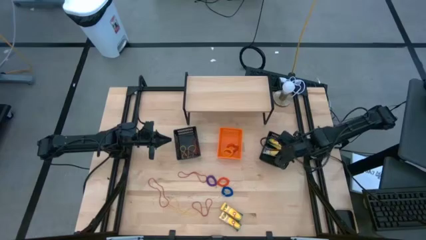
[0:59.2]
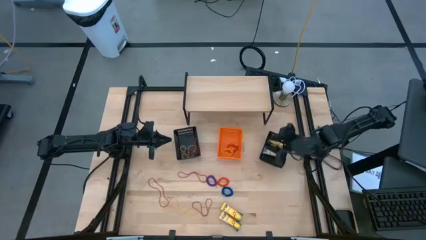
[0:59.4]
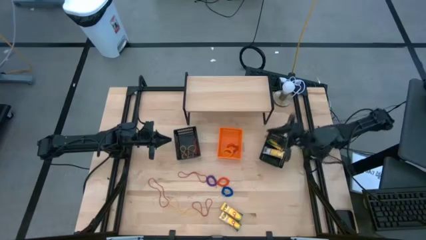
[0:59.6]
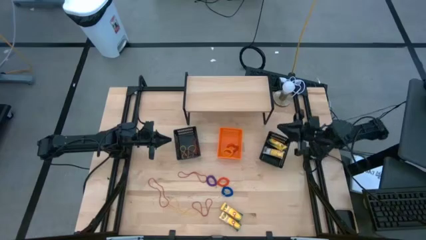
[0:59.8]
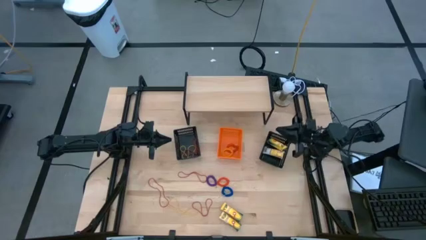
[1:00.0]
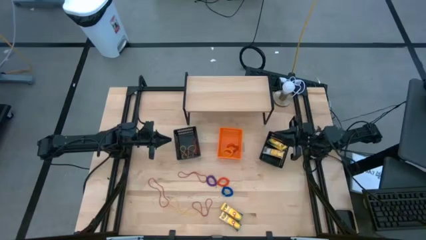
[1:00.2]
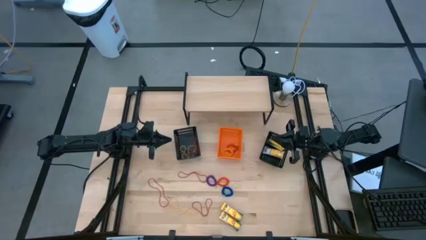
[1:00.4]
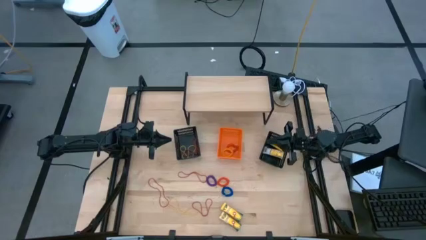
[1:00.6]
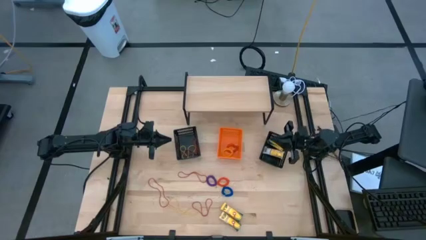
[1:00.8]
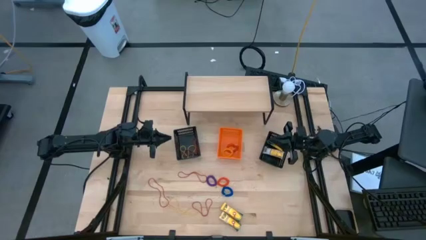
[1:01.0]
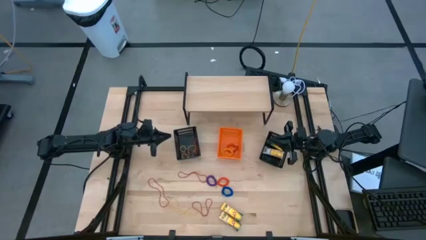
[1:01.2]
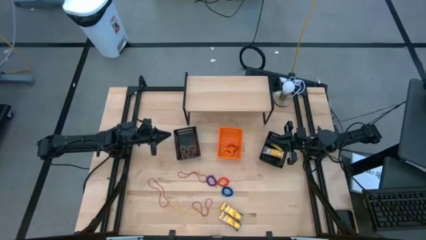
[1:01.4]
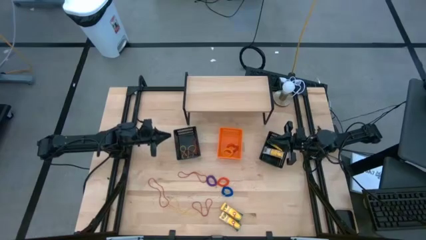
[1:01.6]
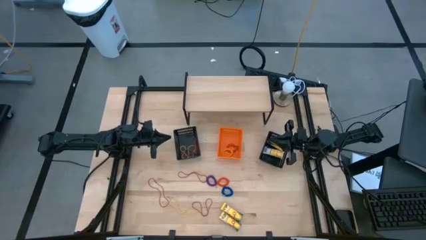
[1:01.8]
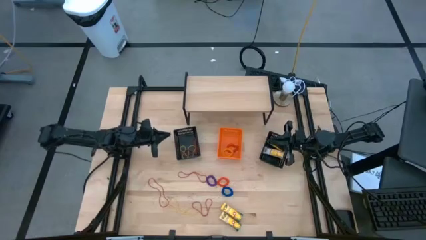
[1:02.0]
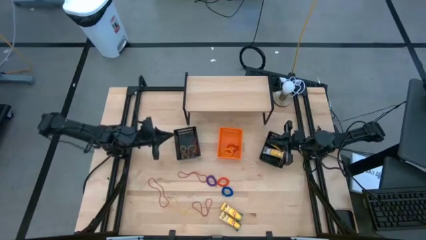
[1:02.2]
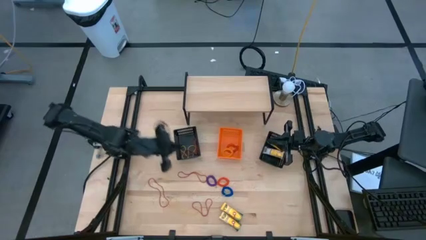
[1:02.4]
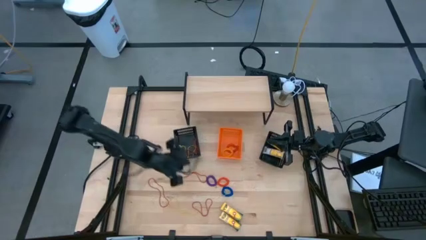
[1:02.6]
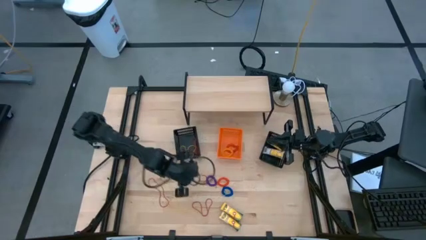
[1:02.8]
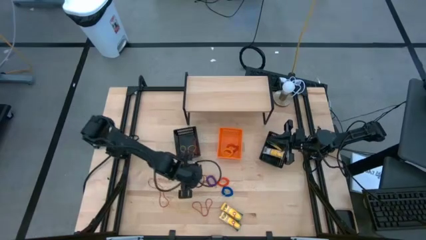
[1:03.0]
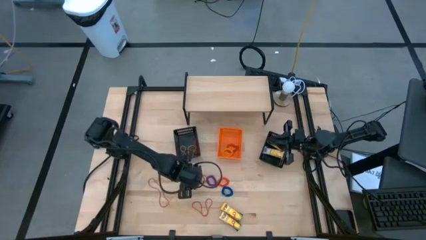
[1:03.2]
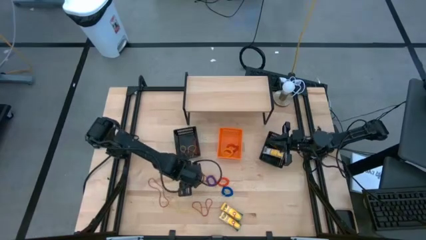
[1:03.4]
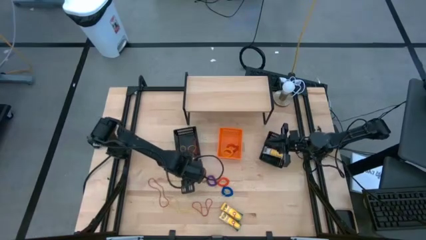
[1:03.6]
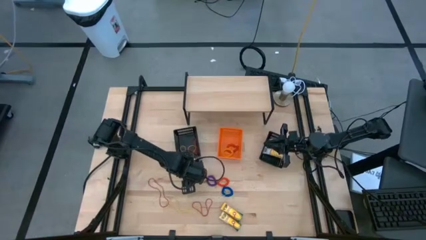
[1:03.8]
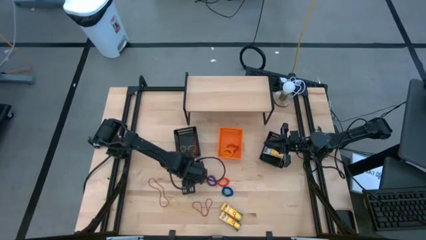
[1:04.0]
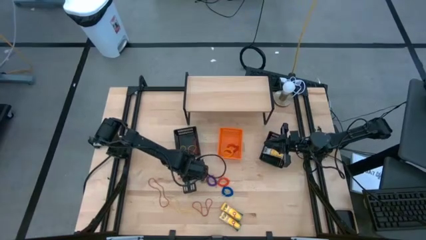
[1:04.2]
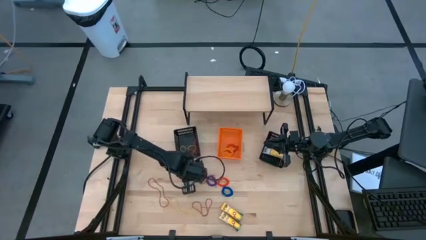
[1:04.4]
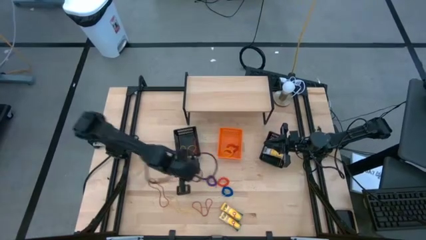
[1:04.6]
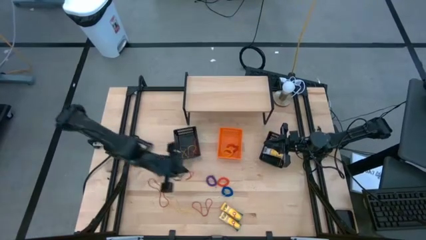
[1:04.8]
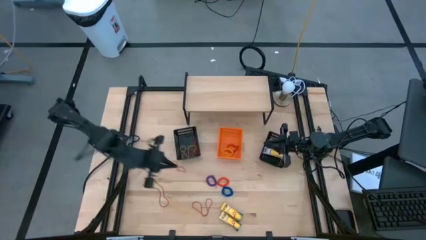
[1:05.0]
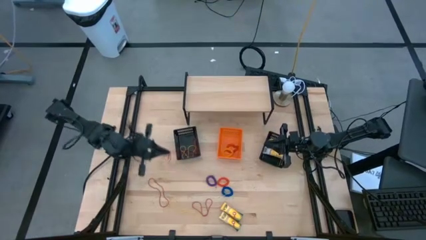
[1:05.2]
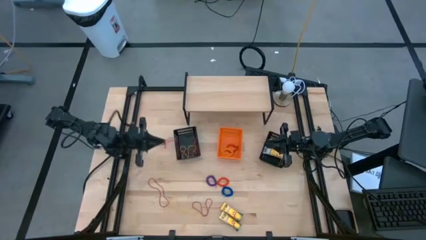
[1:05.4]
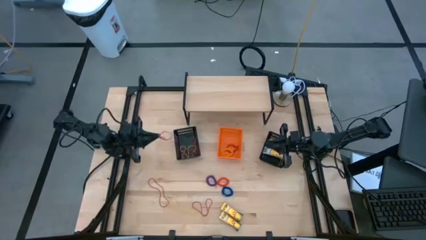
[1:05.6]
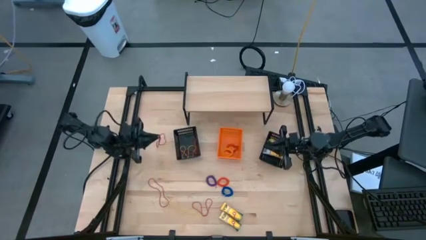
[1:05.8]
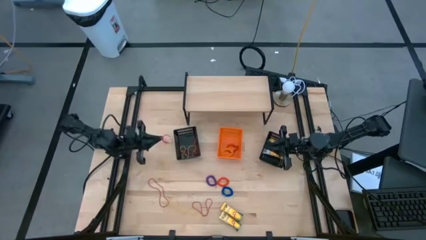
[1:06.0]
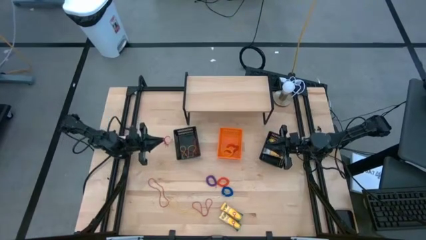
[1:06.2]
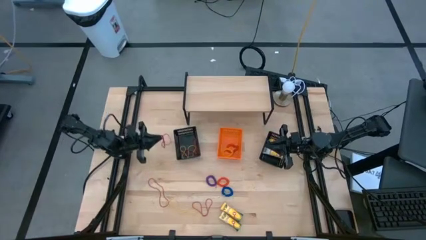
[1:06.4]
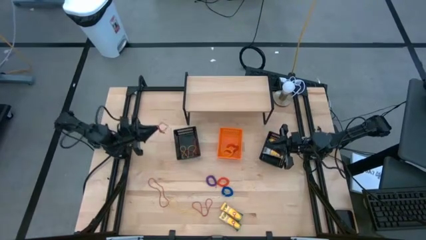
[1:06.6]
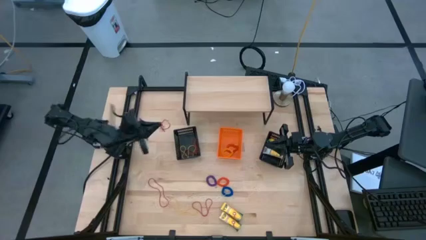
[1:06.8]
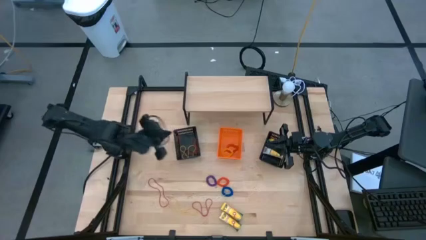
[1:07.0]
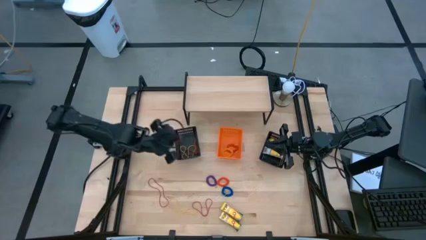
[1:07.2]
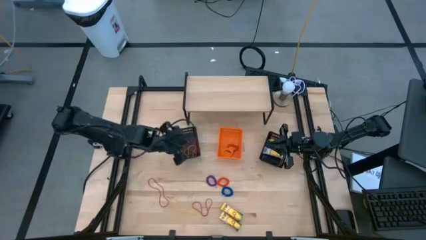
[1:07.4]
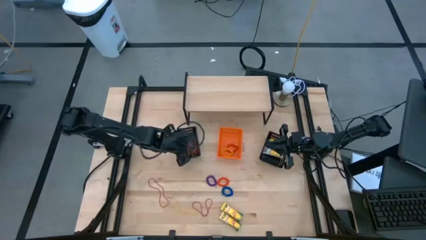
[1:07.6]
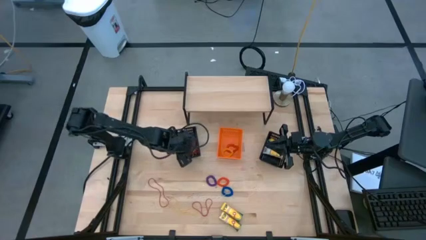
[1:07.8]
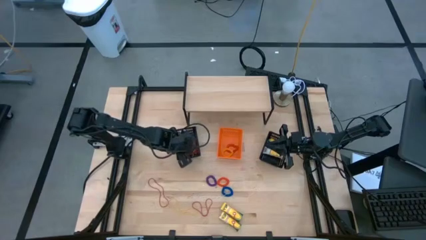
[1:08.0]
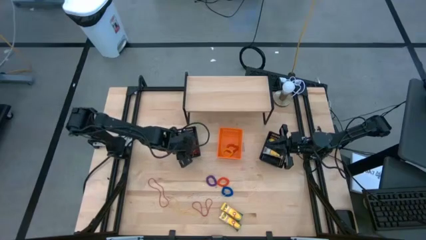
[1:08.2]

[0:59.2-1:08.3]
Task: Pick & Place Office Desk Supplies
Put the red rubber band into the left black bin

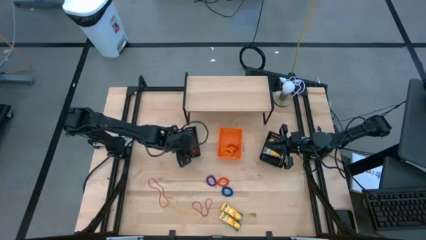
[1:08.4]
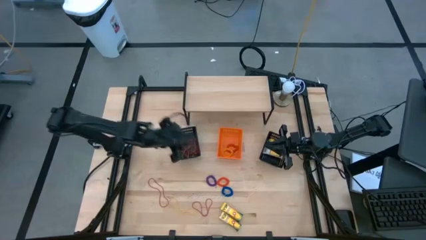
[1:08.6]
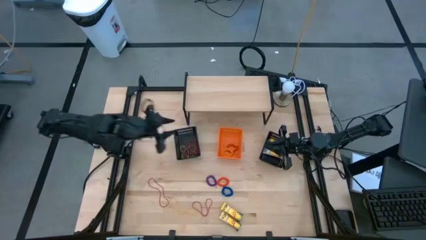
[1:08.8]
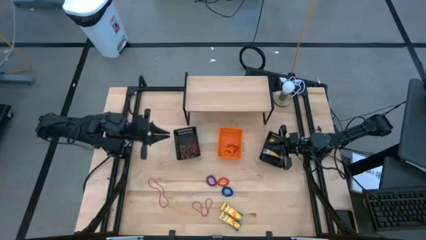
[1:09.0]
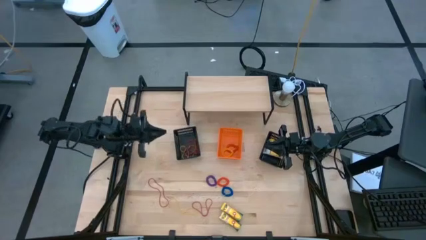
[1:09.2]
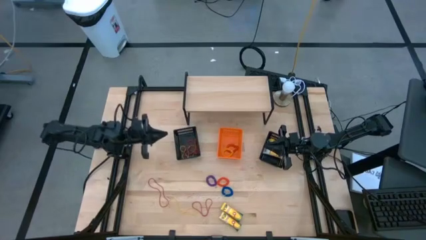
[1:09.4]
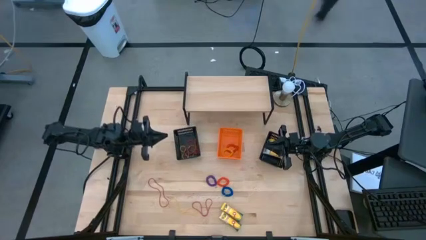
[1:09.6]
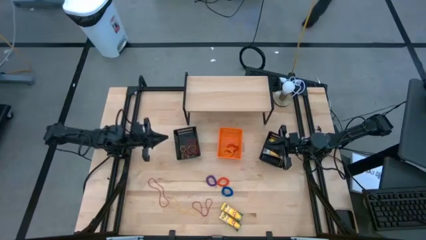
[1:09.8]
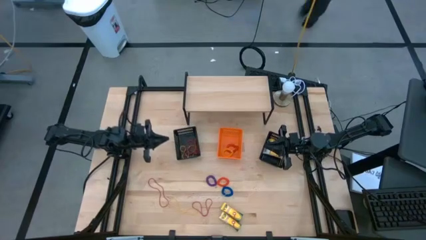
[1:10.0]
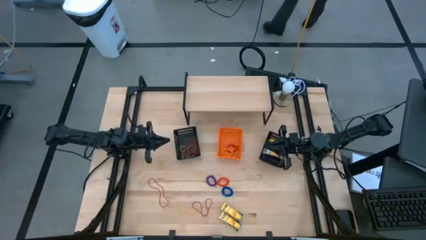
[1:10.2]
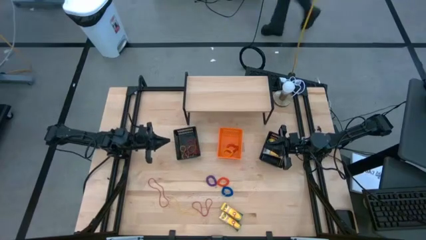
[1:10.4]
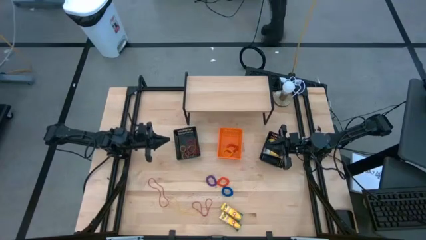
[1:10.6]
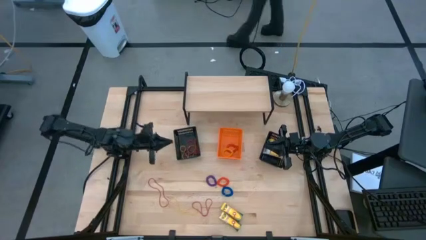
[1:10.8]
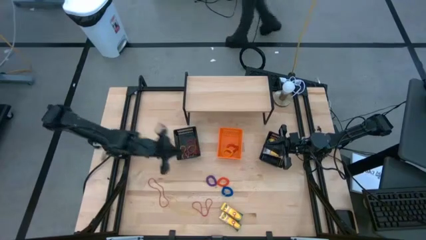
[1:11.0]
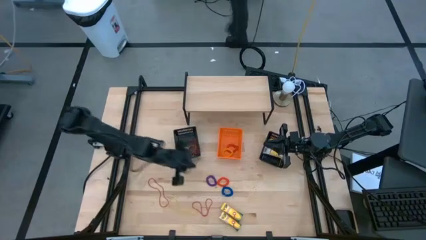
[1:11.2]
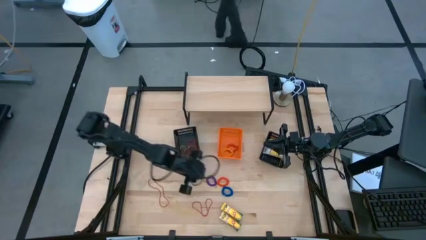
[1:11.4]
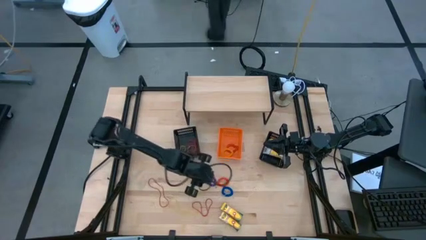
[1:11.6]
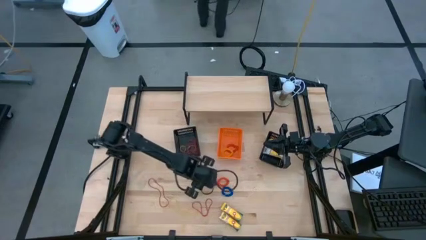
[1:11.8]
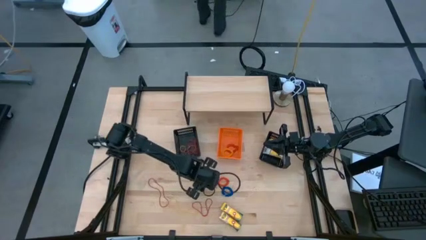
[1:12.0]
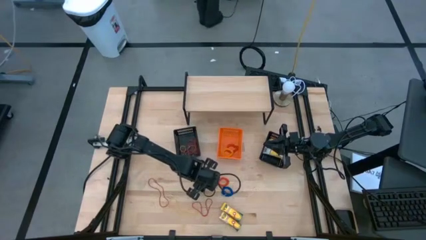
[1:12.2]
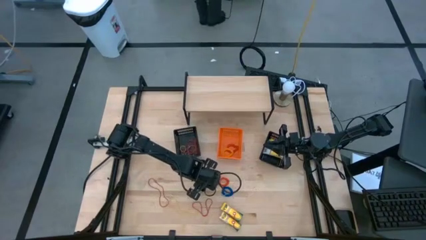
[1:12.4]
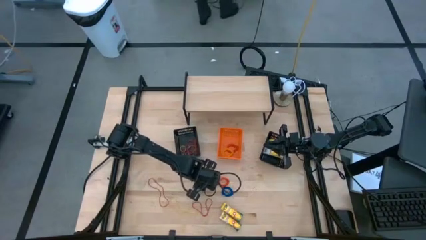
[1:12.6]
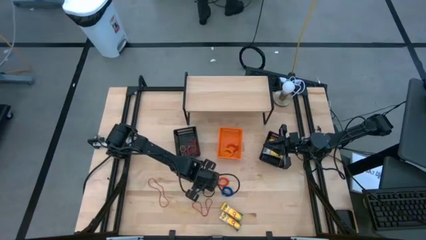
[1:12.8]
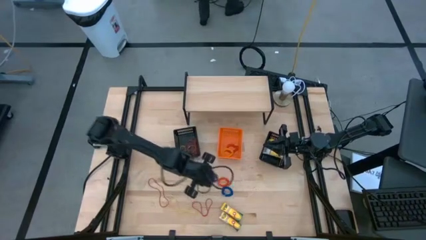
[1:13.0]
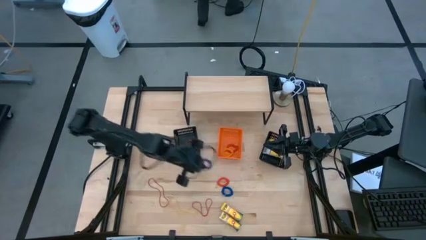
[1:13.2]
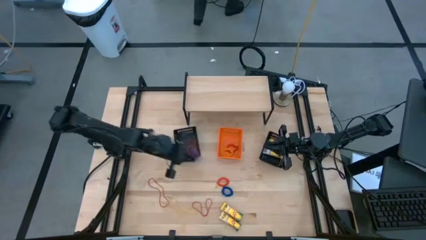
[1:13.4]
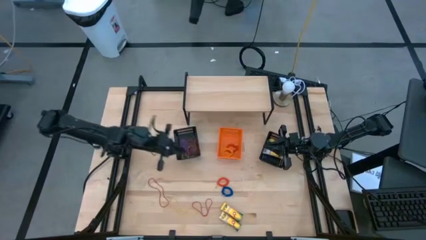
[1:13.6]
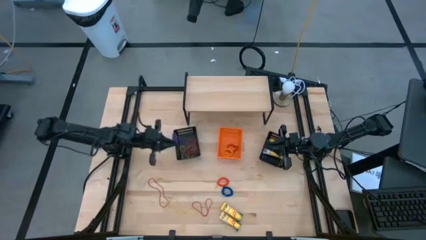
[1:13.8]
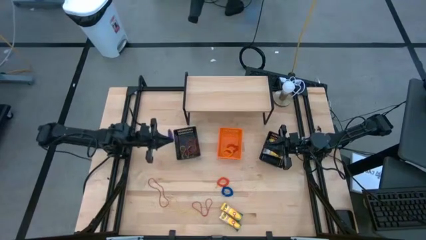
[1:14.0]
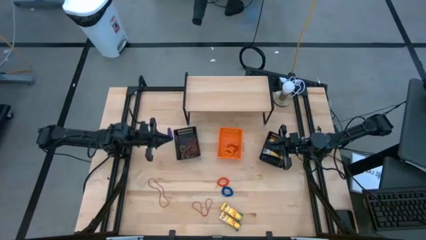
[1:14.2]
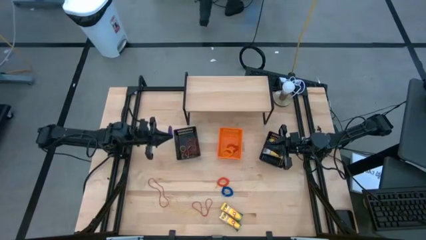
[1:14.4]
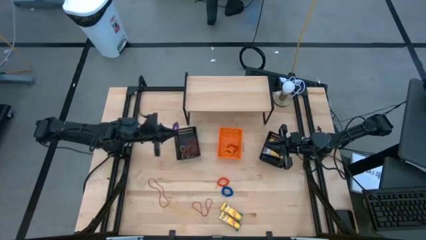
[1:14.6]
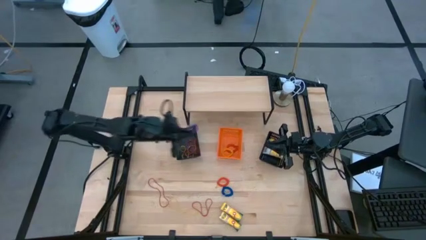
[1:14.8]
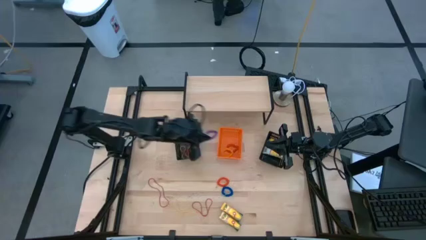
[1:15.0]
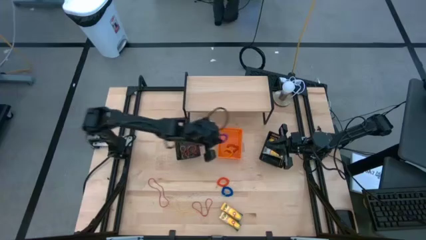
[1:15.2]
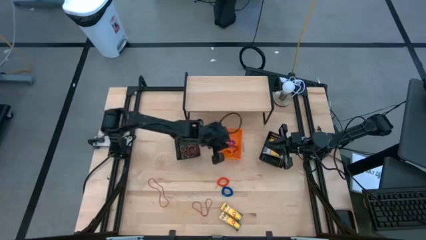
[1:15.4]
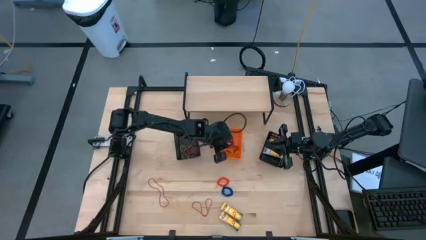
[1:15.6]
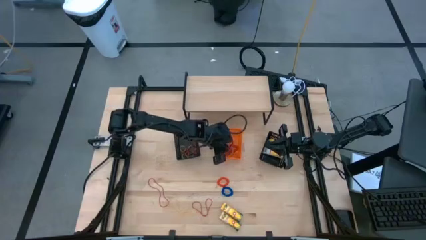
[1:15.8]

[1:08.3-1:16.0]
Put the violet spring keychain into the orange bin
